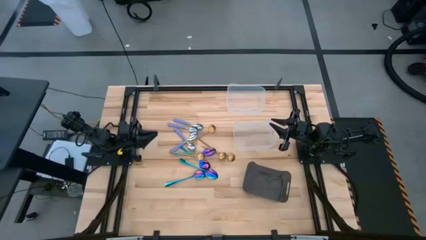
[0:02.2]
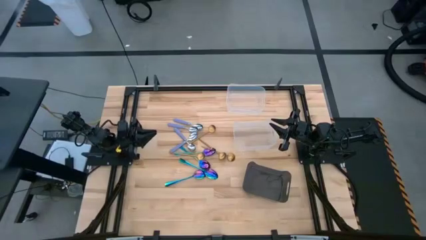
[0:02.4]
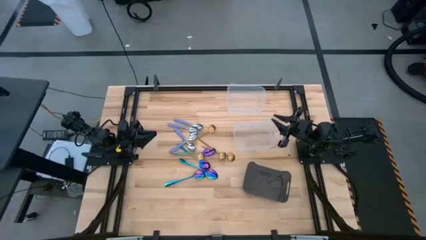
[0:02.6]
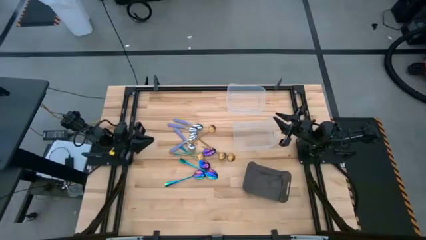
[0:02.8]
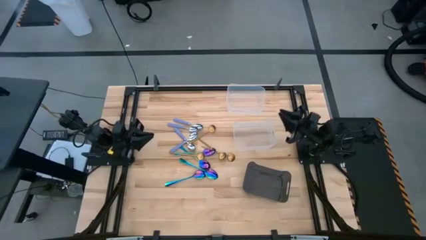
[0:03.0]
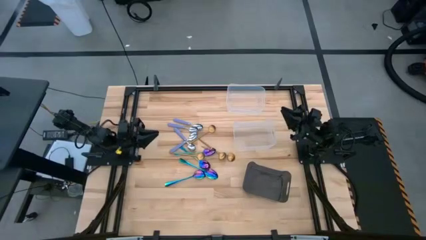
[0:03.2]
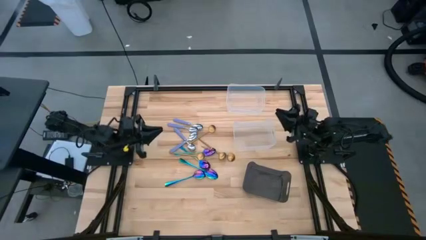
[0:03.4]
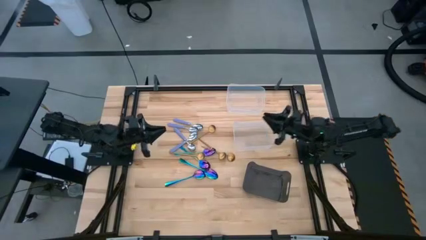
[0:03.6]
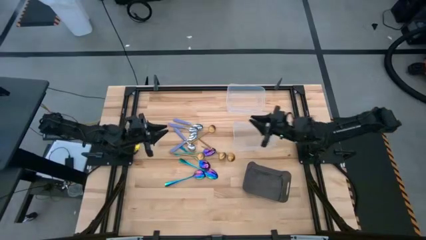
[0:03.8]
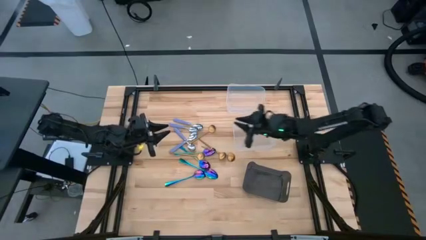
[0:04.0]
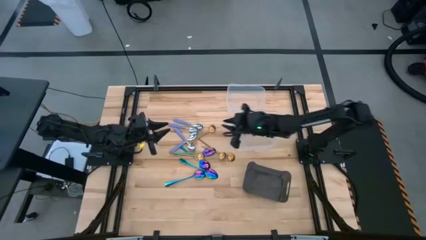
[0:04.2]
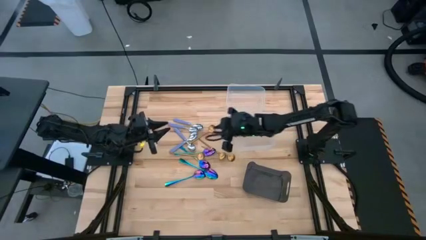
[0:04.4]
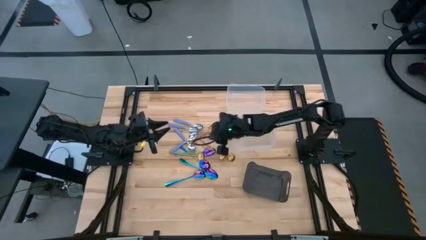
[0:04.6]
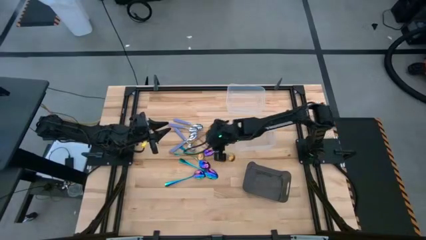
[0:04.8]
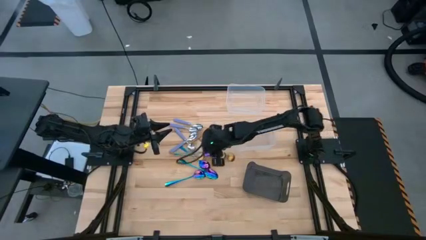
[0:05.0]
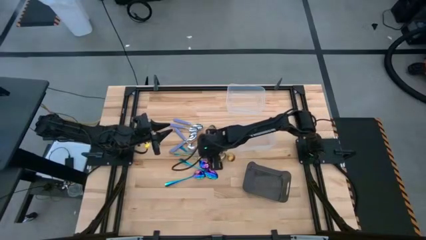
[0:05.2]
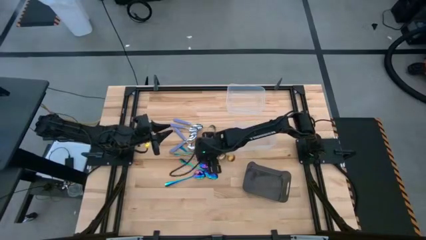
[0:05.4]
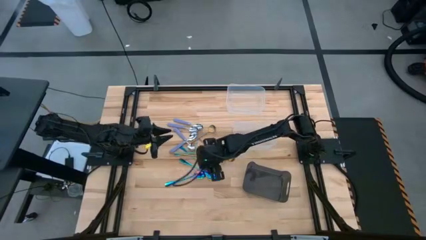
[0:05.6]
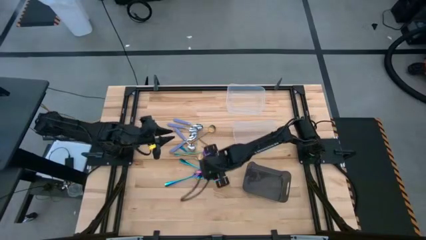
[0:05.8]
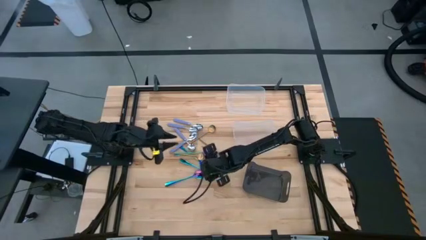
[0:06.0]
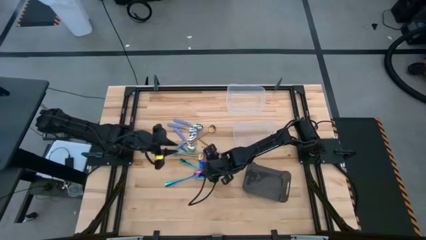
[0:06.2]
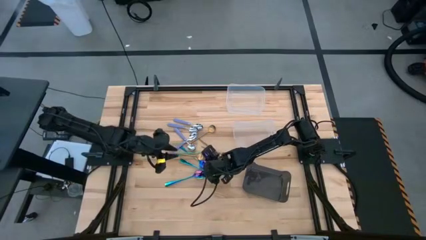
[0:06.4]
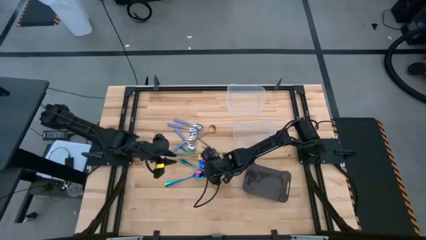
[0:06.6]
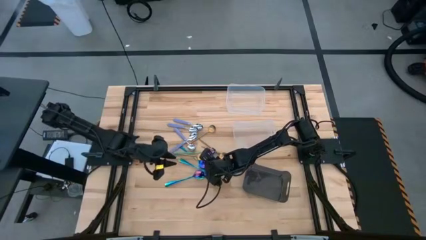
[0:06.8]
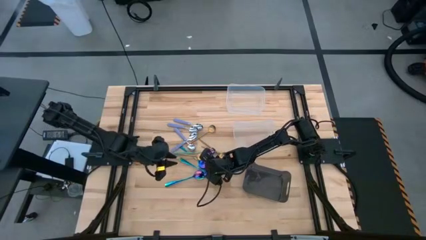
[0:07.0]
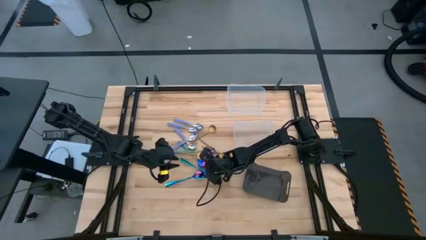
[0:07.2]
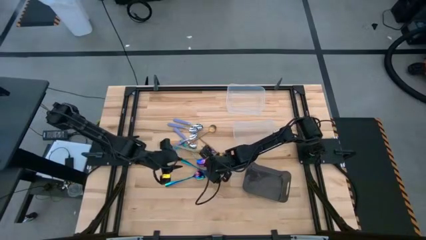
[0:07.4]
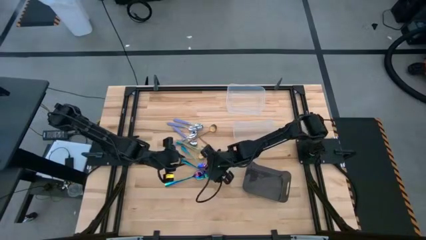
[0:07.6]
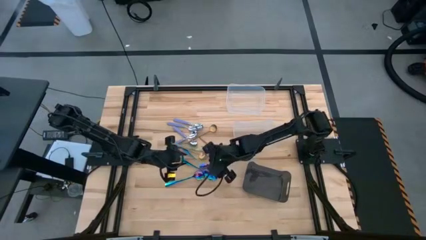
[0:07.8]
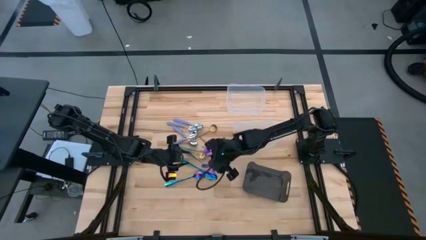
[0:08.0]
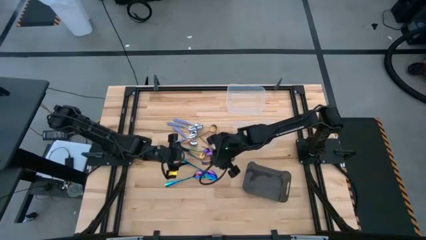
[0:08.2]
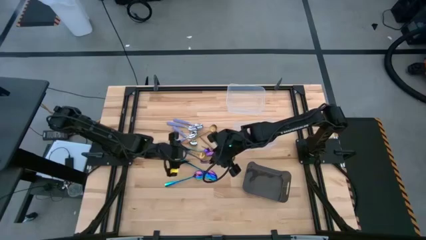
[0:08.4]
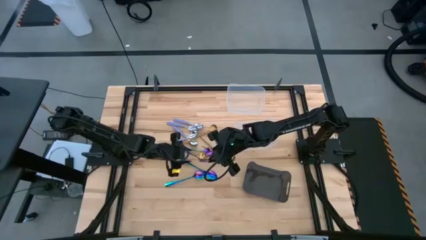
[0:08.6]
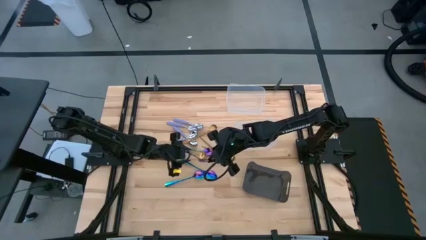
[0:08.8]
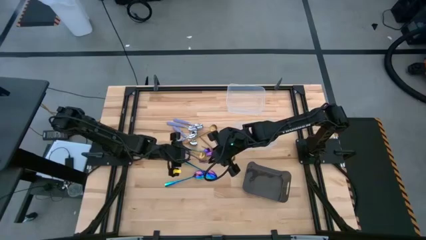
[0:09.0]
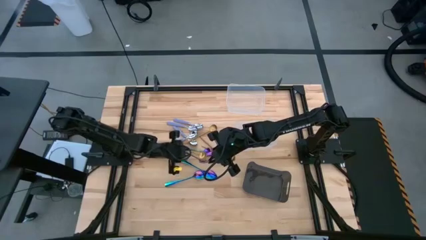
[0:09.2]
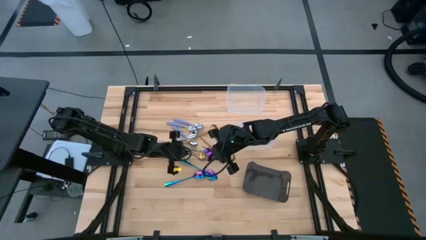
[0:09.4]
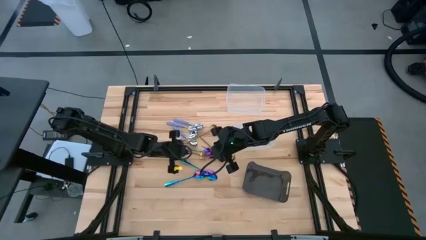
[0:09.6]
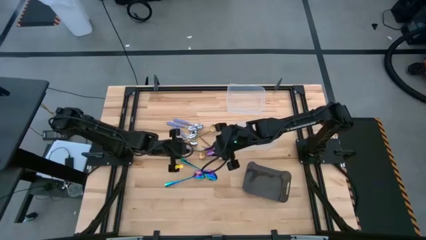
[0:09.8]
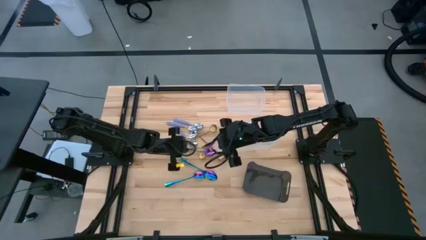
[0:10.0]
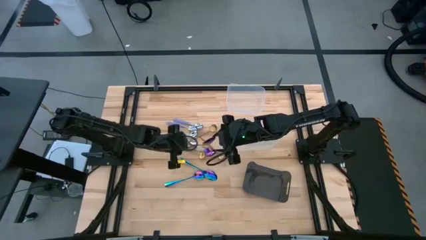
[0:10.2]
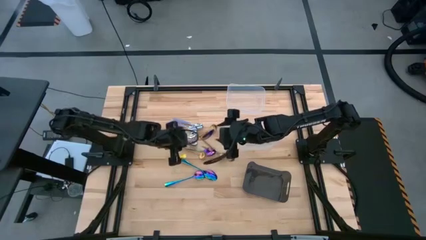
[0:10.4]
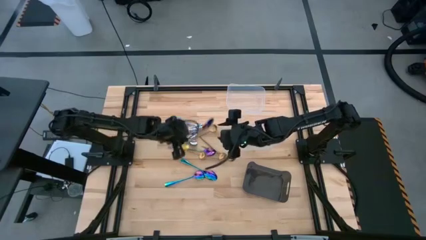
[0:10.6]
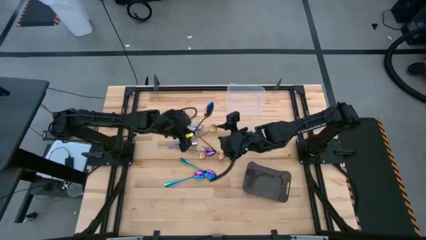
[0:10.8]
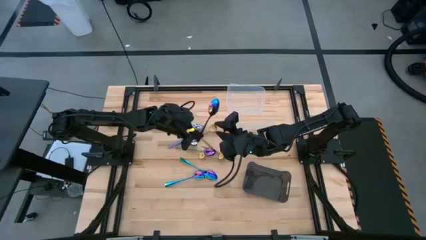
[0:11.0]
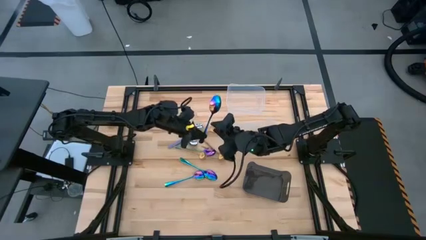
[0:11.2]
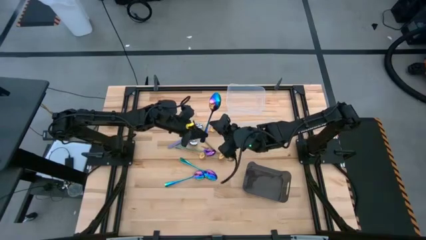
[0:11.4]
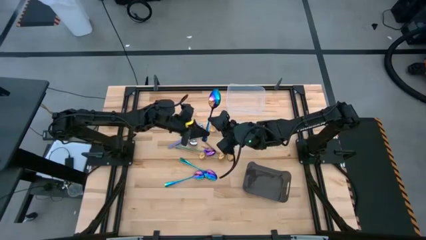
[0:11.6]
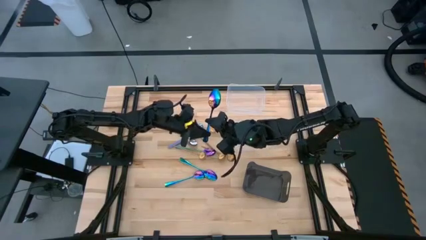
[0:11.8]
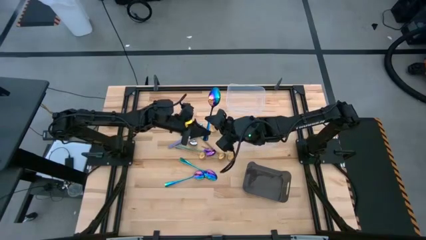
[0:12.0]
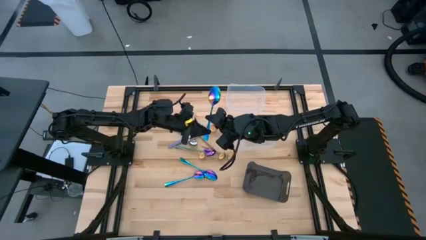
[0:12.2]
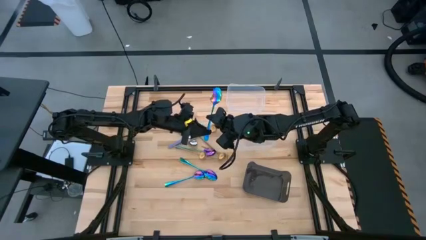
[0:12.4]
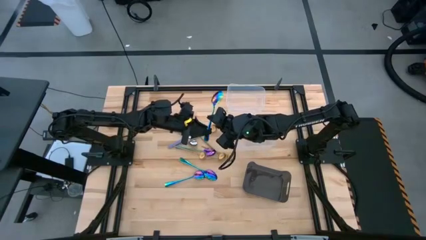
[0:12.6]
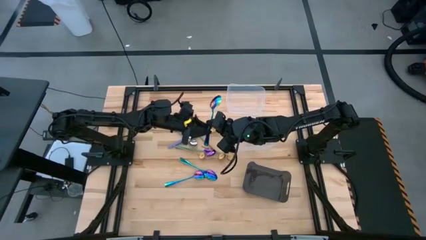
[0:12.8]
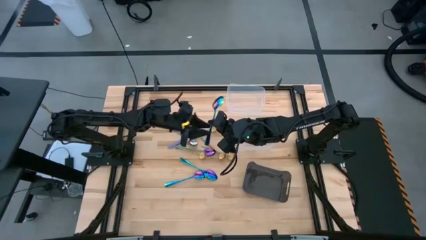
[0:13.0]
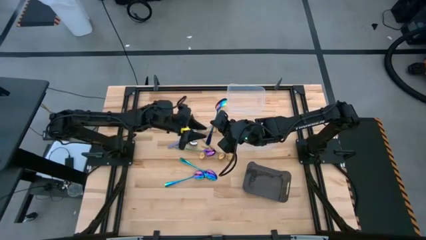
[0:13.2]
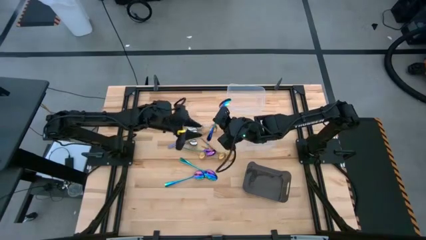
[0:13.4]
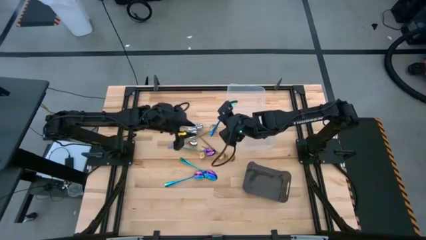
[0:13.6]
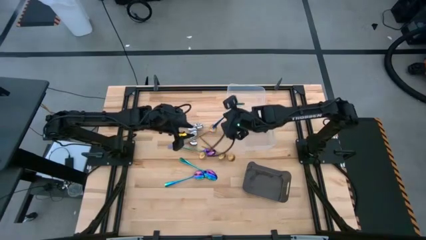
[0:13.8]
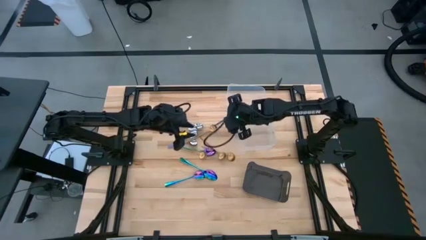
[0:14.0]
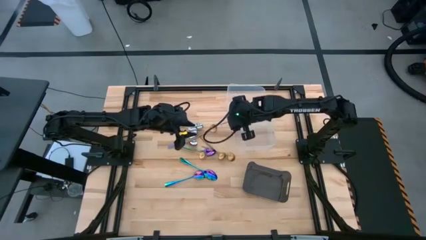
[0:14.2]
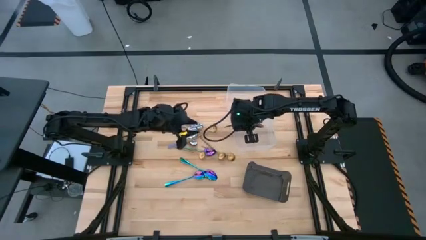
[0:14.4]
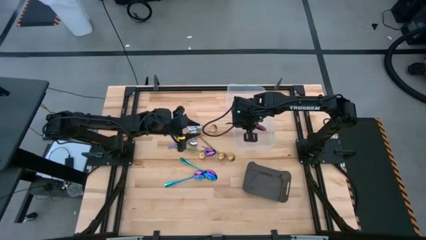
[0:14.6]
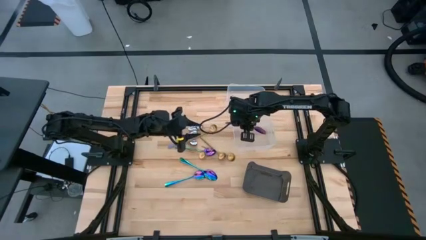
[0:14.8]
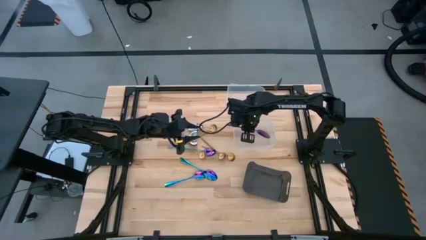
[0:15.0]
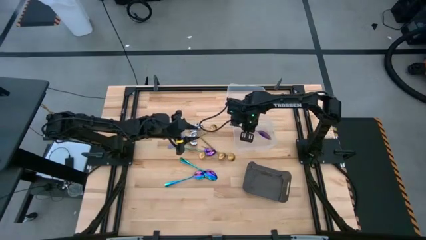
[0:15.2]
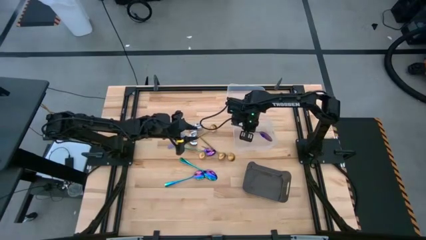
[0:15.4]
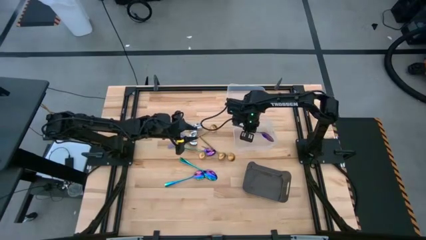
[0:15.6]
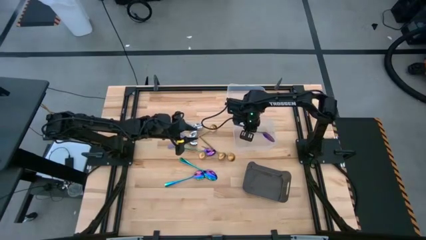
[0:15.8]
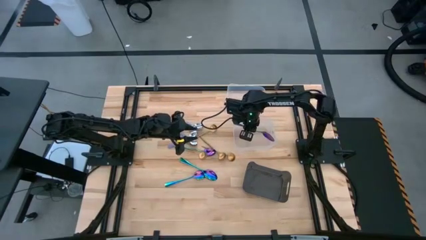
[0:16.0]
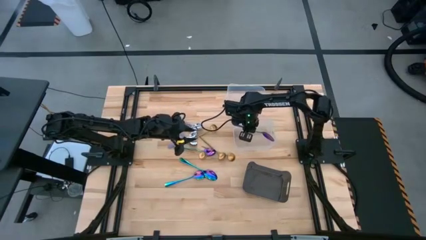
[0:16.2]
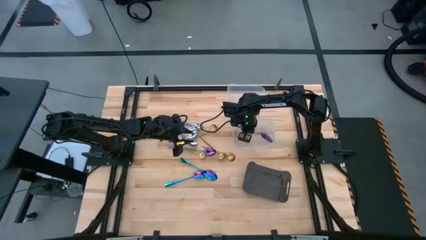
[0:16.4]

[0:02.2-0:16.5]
Task: Sort silverware by color (type)
Put the blue spoon into the bottom transparent bin
